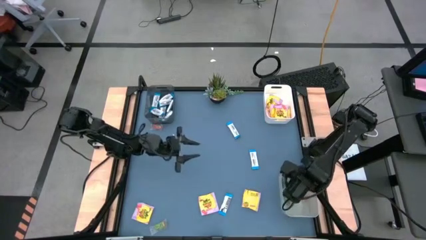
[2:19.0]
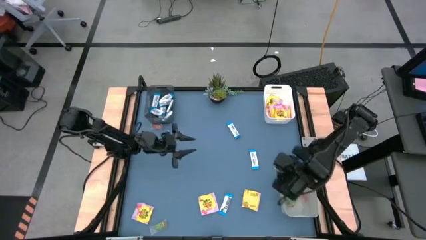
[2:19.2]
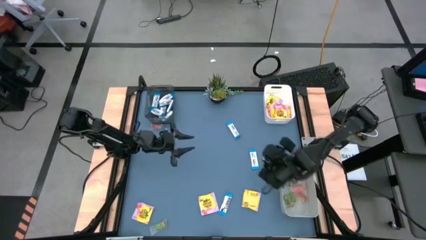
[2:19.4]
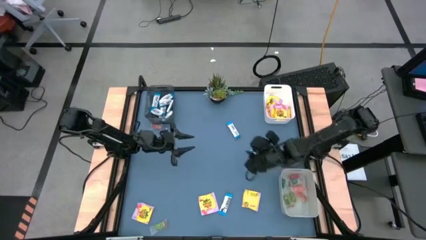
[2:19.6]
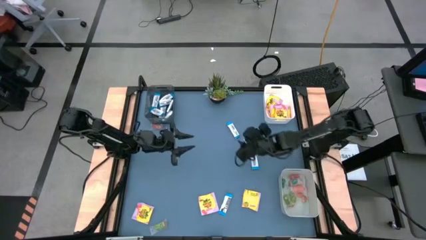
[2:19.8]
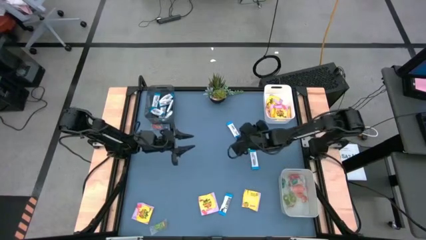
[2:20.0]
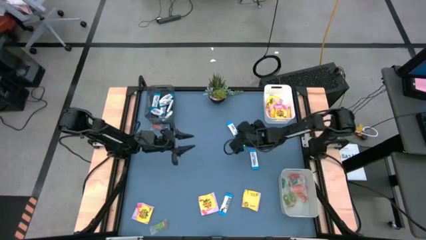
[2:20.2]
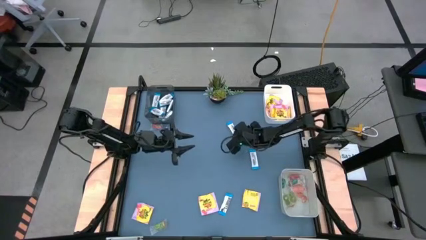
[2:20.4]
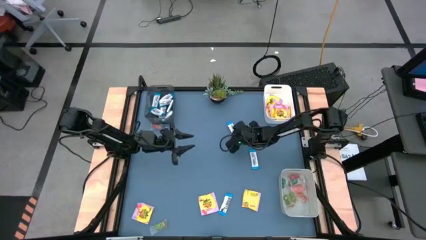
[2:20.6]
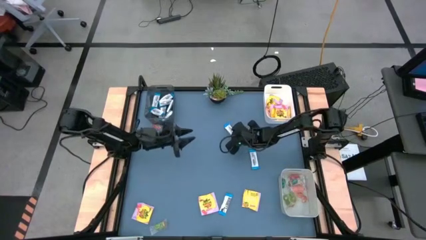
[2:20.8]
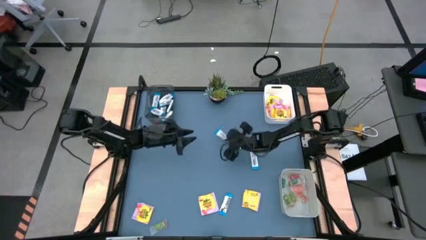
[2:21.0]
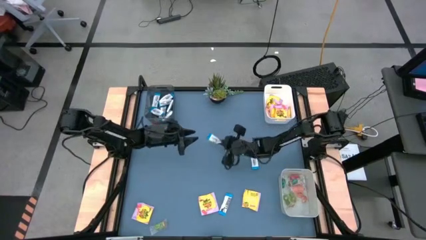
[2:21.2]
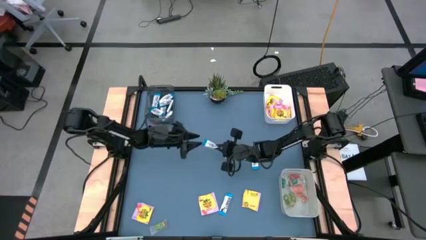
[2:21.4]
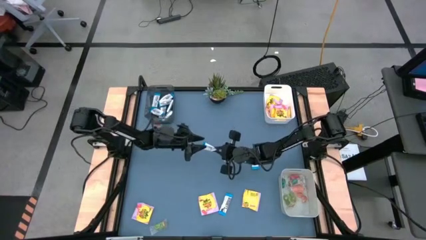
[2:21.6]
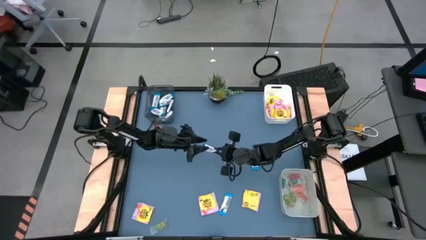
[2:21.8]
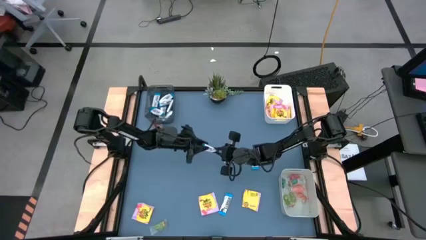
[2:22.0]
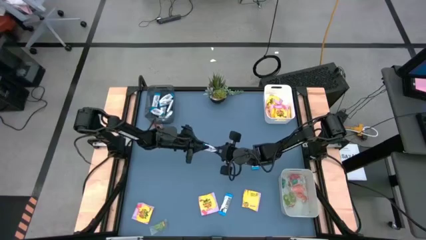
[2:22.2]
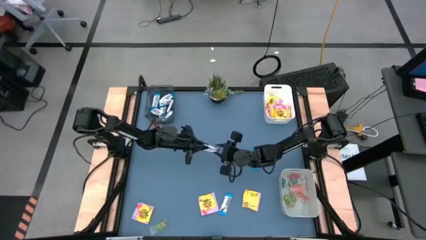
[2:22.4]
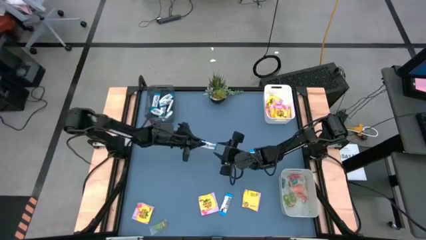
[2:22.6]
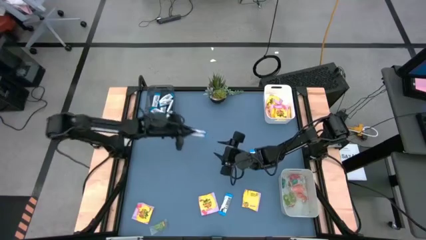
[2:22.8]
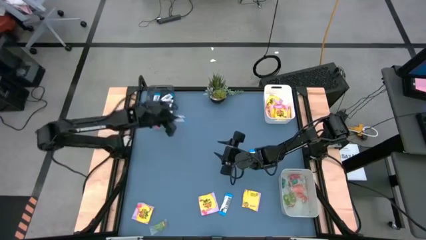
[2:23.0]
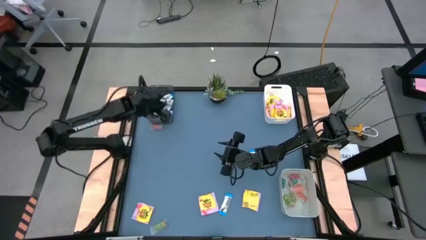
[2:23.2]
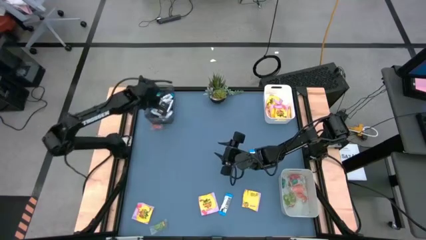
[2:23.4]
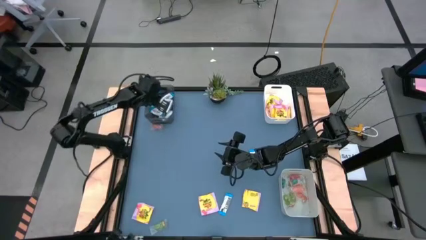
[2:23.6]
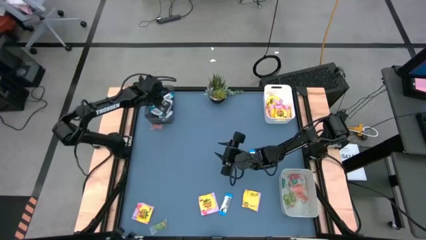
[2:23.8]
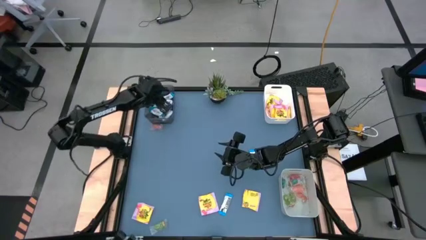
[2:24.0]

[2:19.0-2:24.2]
Task: Sort candy
Put the top white chocolate bar into the transparent black bin

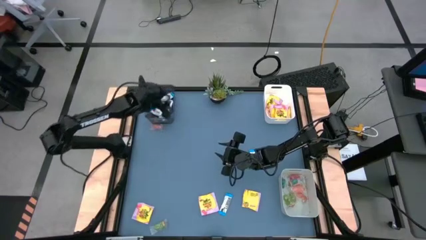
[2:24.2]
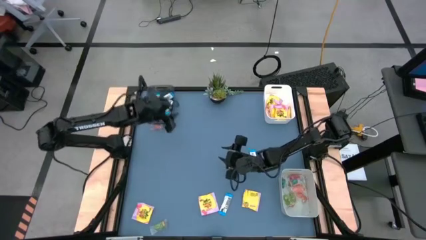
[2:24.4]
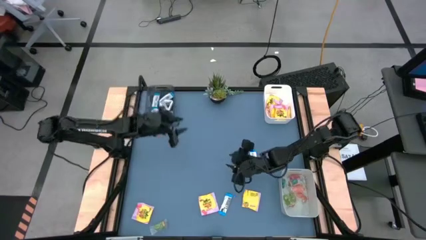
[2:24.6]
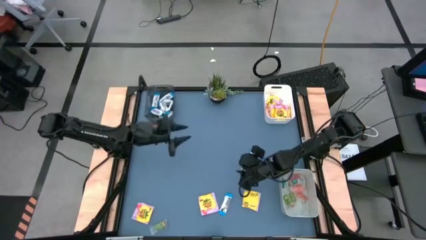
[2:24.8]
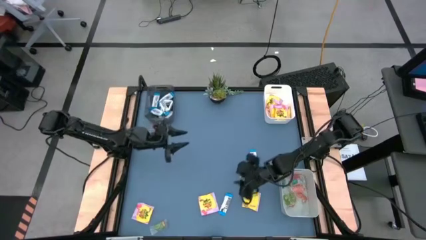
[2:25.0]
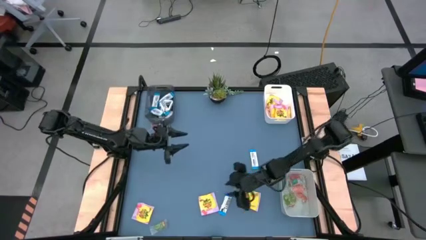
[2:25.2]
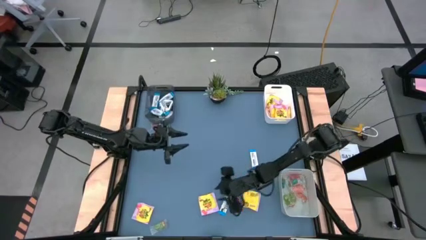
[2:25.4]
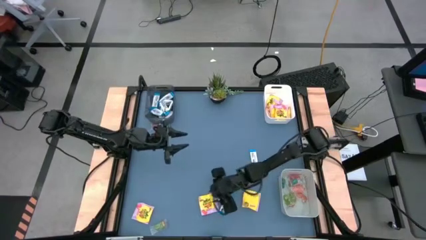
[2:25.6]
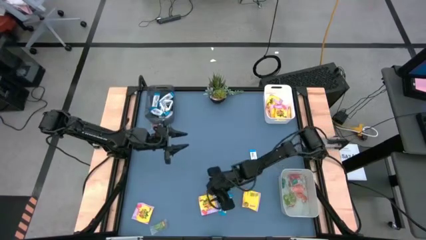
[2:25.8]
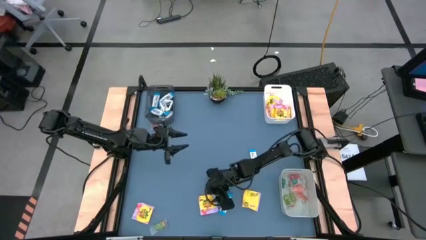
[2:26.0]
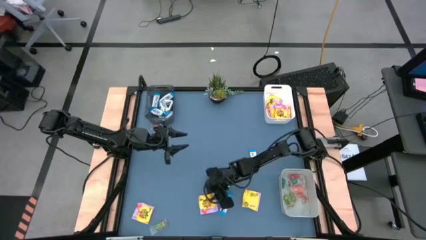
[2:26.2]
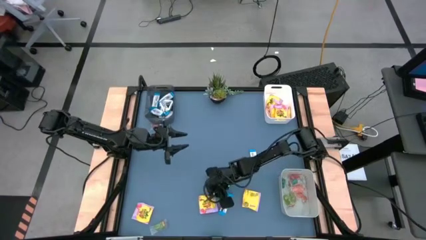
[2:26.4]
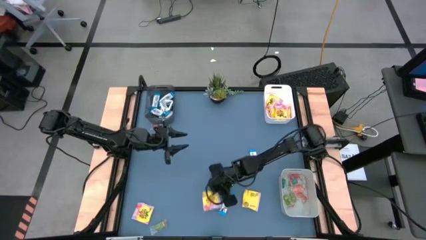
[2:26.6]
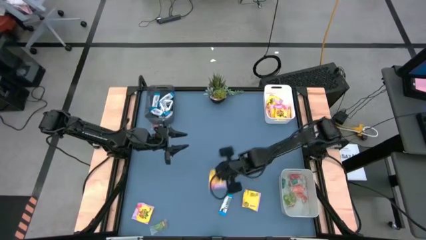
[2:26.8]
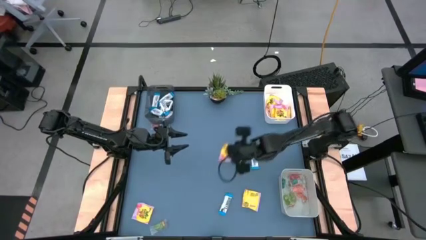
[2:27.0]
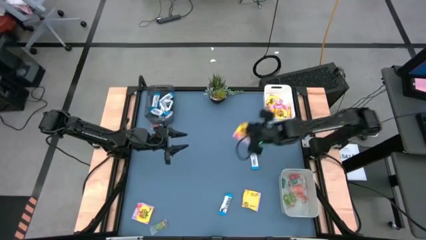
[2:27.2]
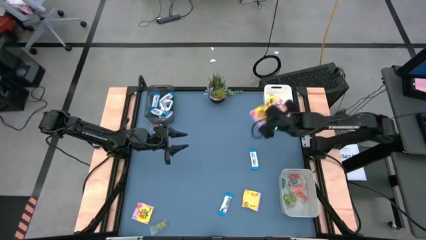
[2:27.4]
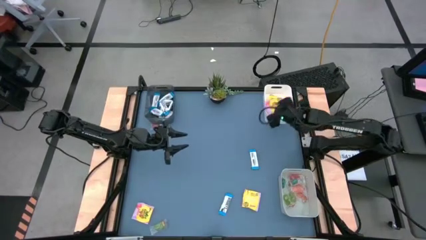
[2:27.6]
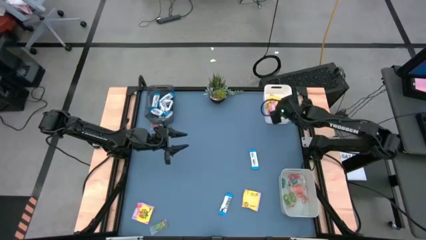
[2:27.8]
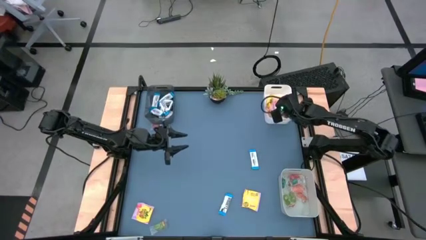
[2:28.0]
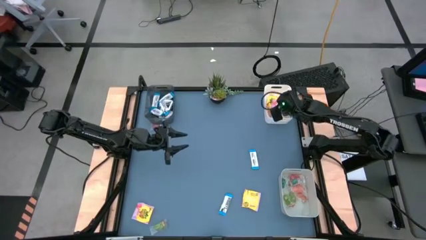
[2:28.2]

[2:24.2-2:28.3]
Put the middle bottom yellow candy pack into the white bin

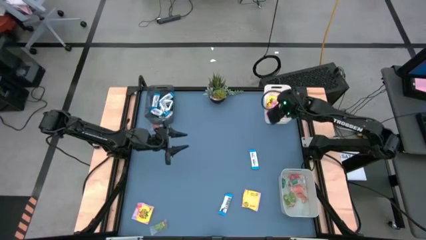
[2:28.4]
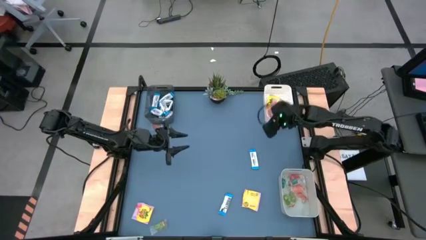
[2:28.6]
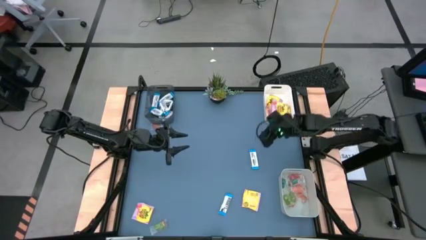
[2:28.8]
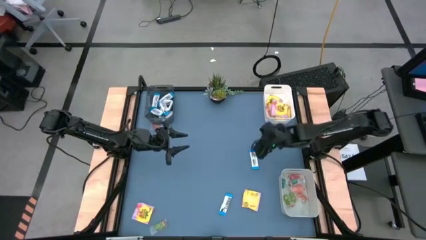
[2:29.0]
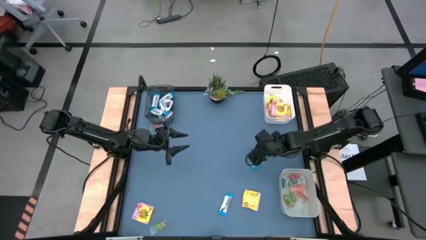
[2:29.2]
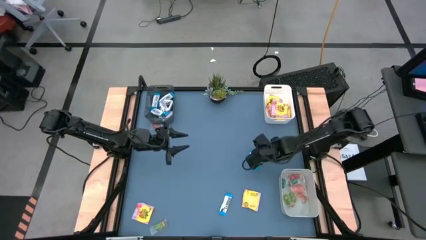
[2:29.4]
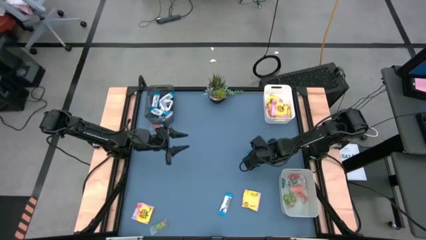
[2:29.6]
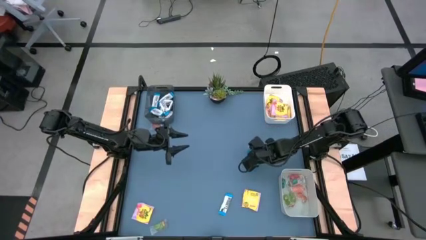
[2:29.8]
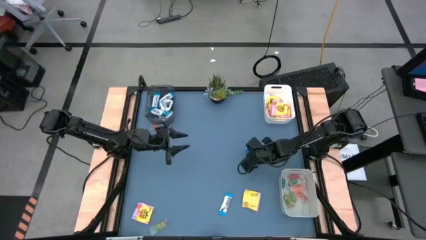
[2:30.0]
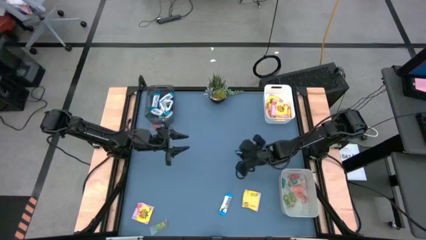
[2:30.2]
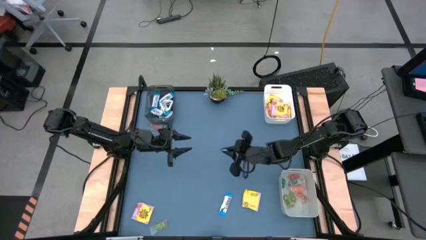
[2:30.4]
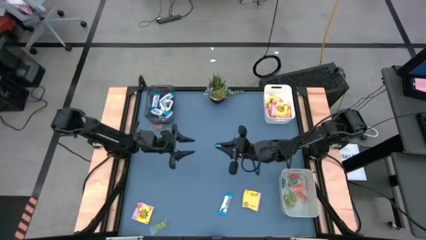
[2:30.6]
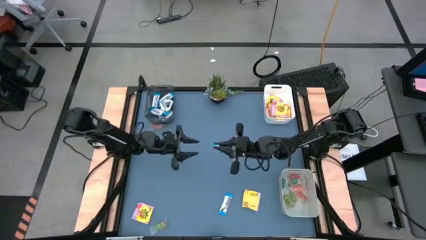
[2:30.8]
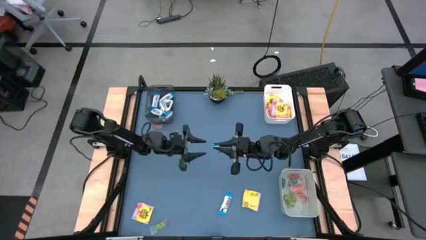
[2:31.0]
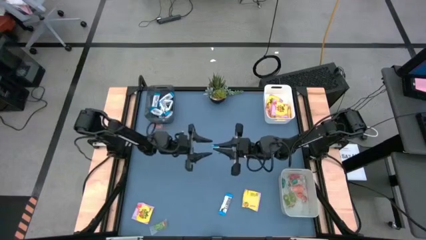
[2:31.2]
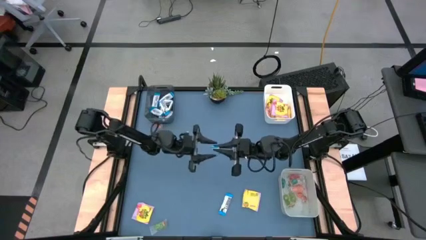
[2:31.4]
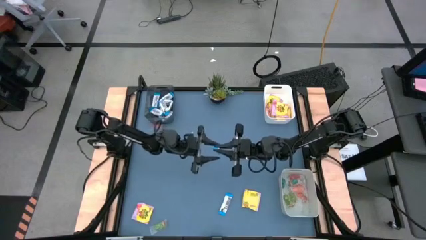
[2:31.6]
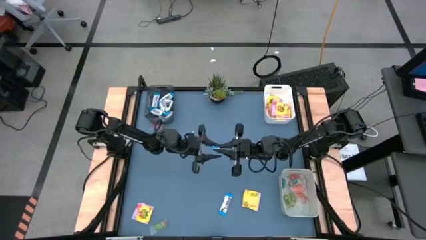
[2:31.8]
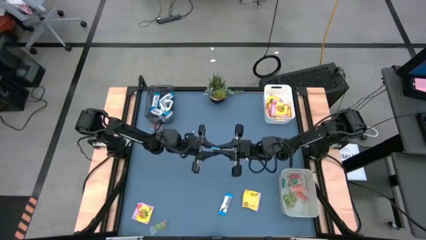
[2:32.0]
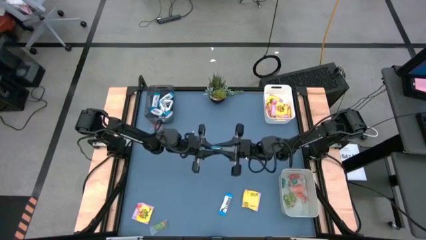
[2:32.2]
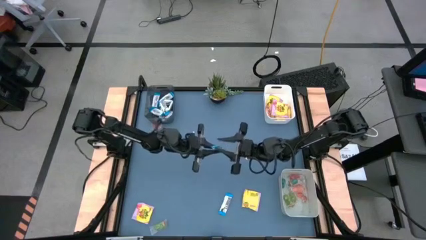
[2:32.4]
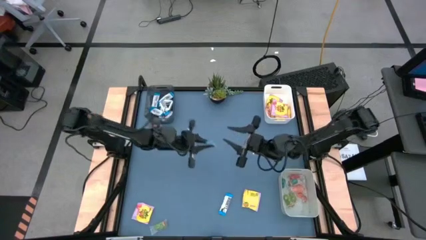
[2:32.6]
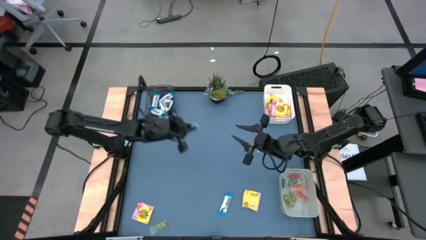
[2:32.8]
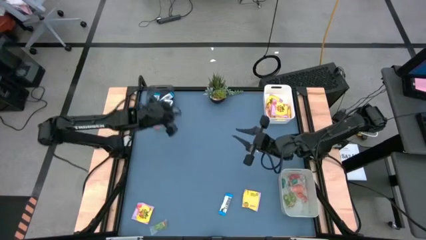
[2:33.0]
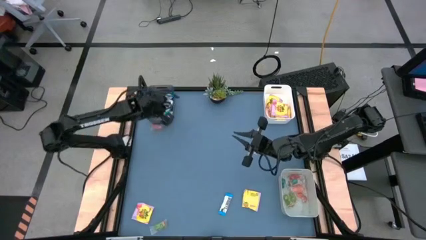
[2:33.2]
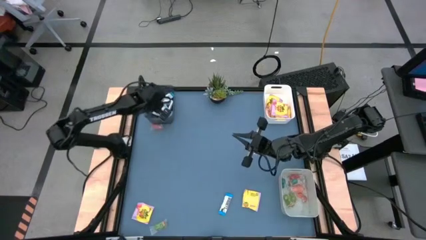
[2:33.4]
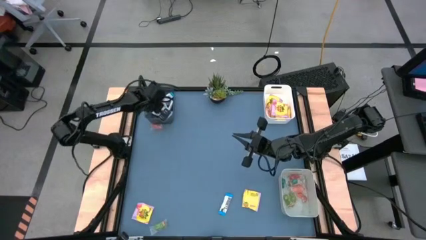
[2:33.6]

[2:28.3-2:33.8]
Put the middle right white chocolate bar into the transparent black bin

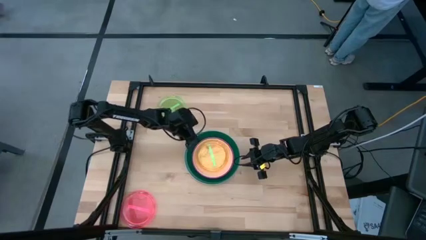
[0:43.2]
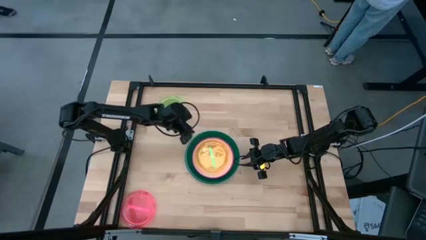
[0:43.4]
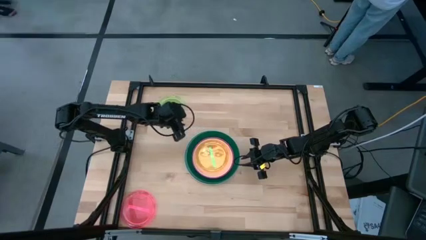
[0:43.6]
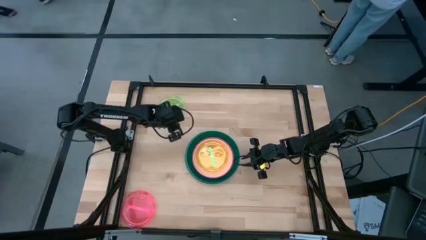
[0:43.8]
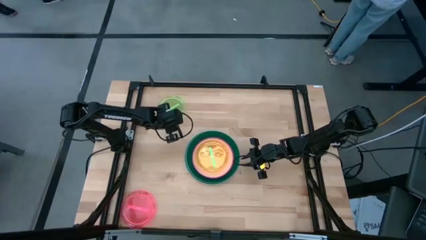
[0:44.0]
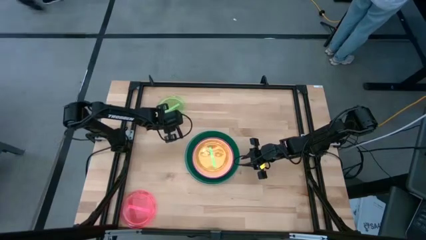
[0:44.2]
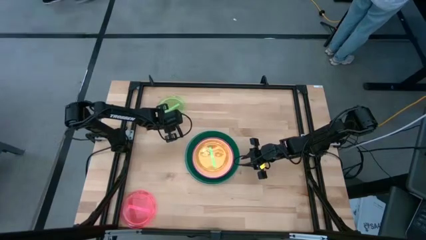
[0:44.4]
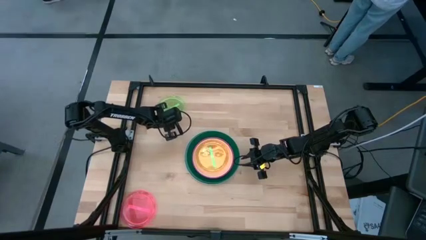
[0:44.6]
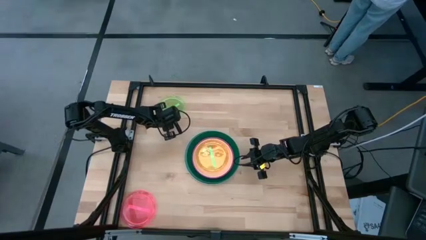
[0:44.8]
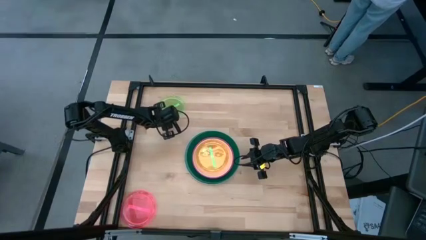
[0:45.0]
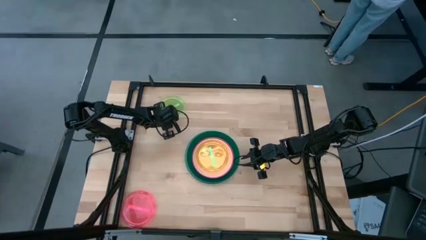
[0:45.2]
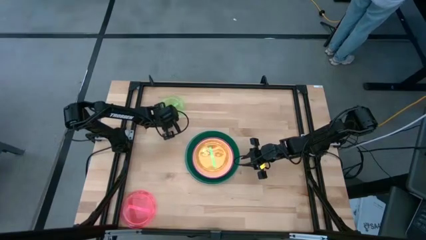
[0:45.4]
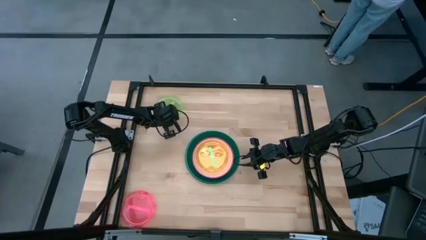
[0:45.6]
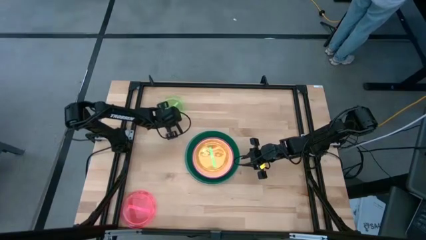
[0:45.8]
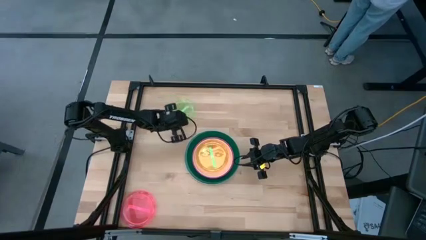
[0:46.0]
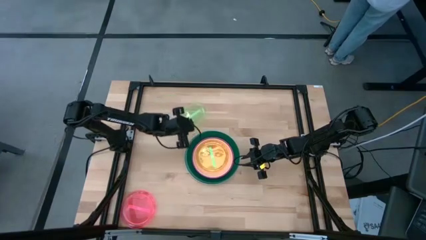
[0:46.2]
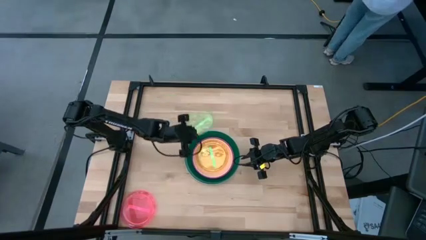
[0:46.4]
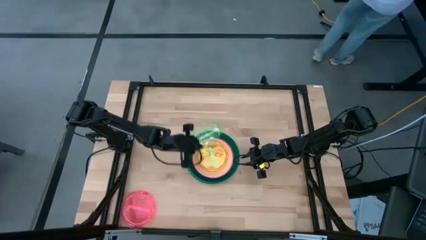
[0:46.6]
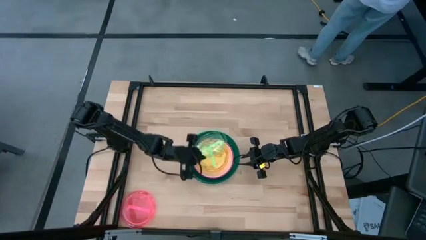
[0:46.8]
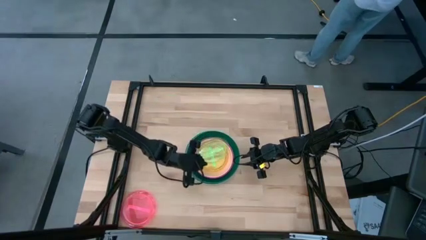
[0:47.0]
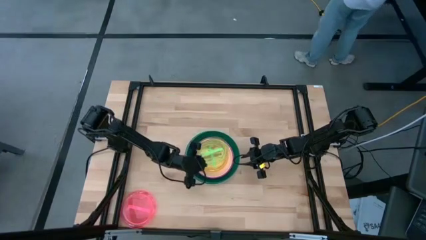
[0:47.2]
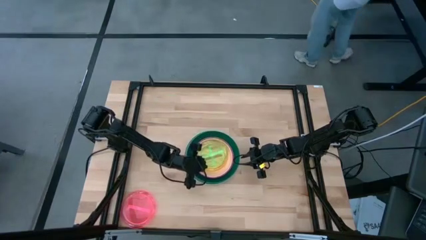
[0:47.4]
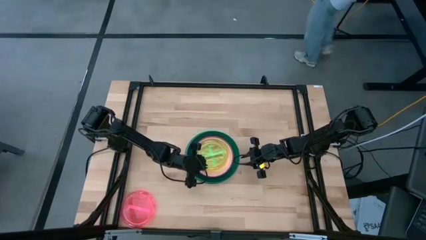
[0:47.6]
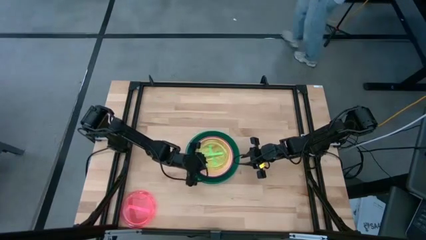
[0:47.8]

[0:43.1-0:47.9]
Task: Stack plastic plates
Stack the light green plate on top of the light green plate
